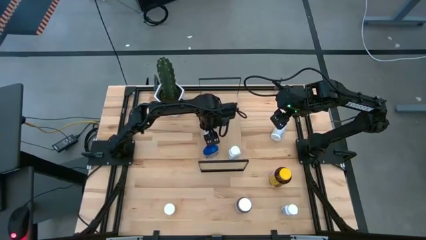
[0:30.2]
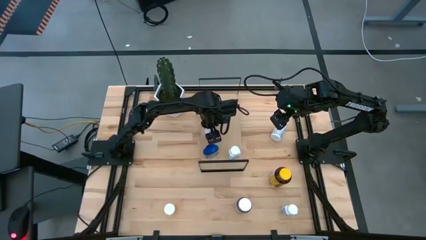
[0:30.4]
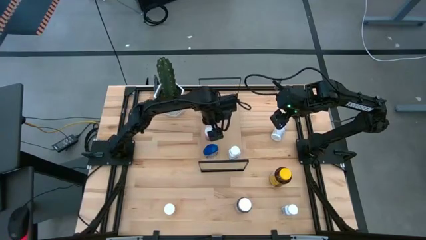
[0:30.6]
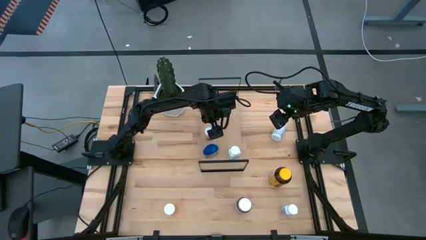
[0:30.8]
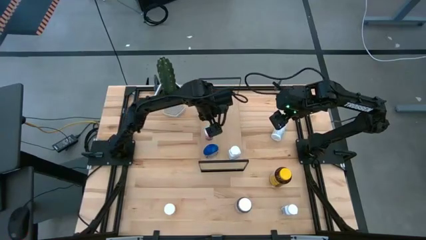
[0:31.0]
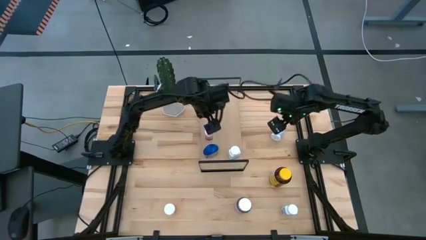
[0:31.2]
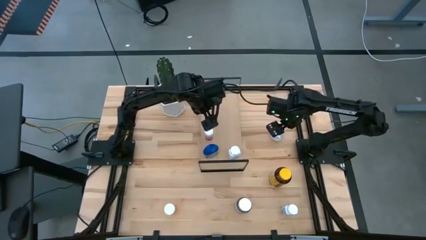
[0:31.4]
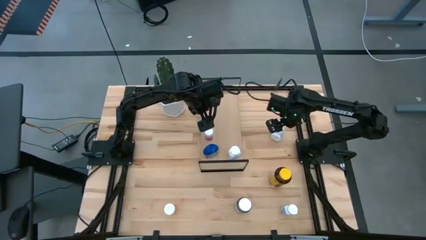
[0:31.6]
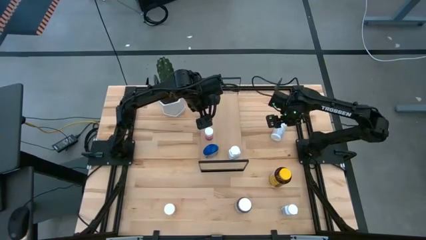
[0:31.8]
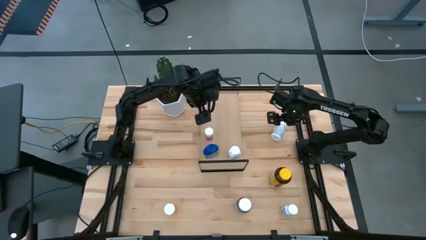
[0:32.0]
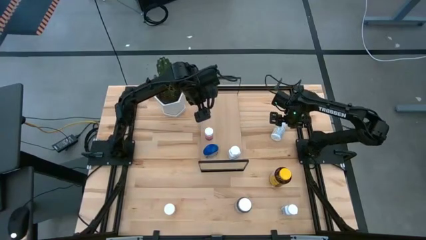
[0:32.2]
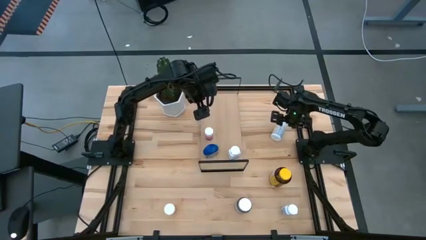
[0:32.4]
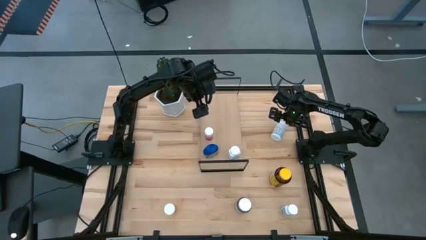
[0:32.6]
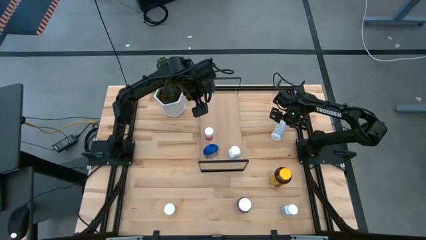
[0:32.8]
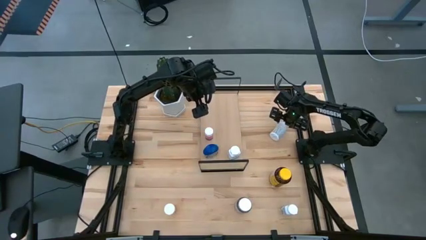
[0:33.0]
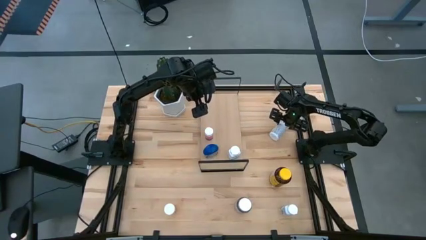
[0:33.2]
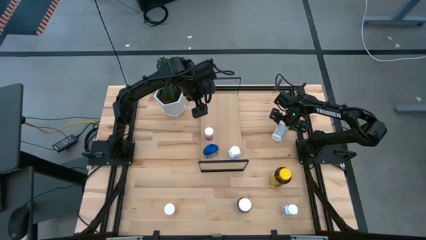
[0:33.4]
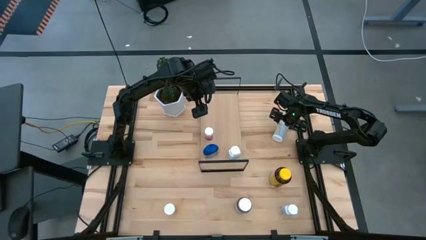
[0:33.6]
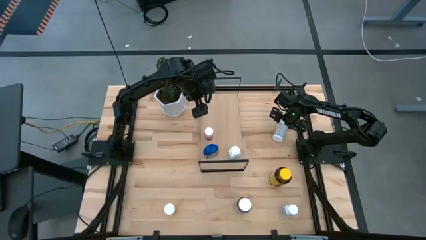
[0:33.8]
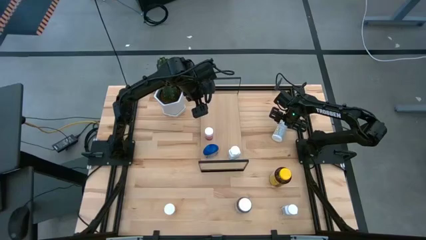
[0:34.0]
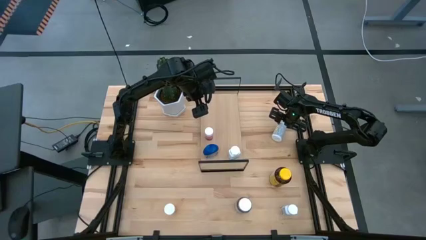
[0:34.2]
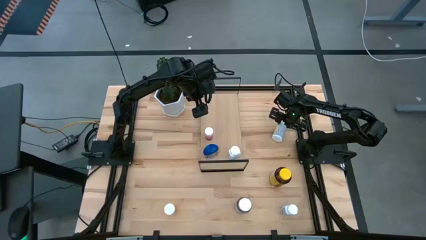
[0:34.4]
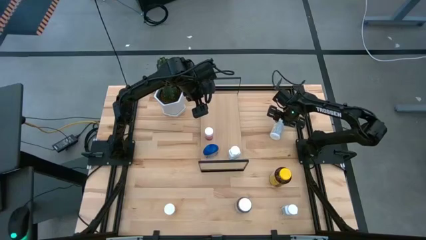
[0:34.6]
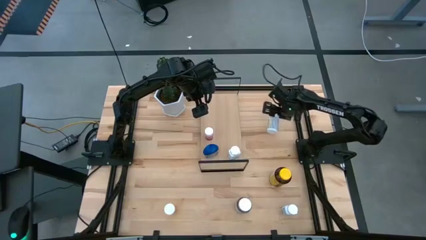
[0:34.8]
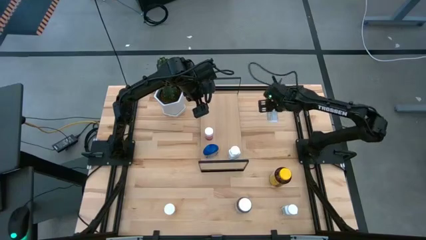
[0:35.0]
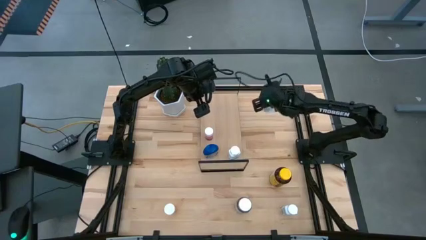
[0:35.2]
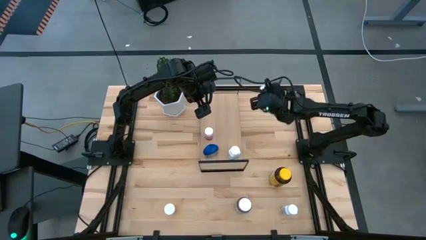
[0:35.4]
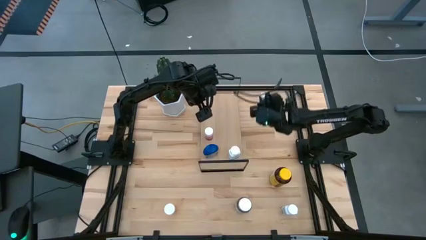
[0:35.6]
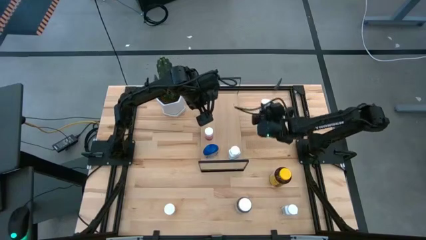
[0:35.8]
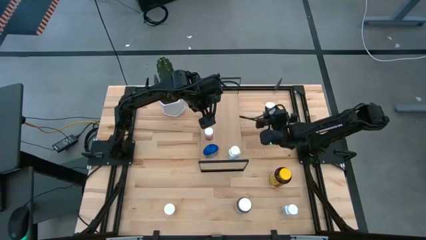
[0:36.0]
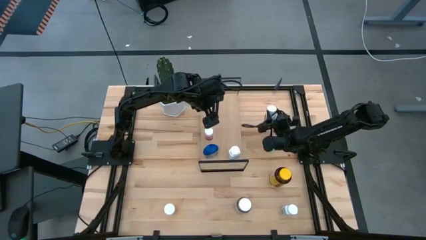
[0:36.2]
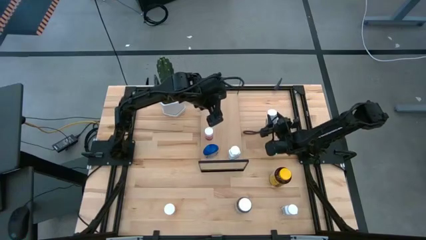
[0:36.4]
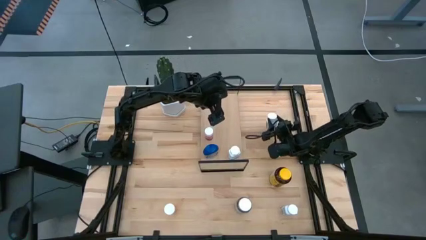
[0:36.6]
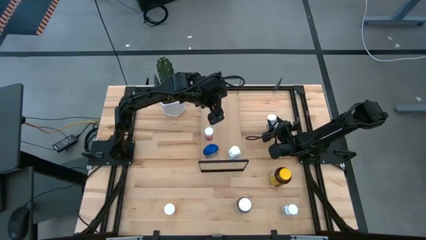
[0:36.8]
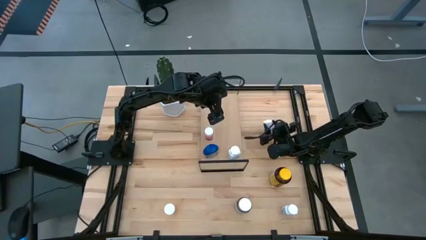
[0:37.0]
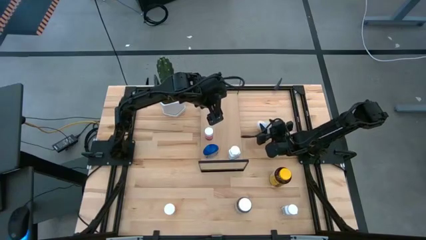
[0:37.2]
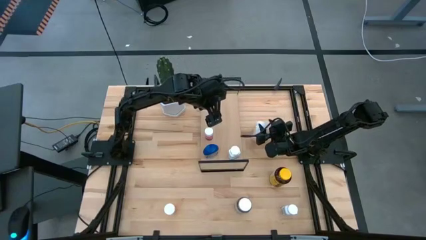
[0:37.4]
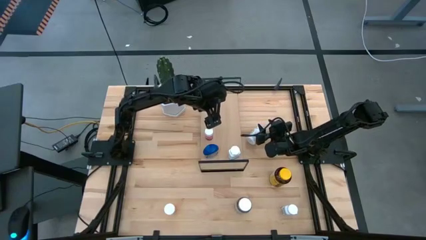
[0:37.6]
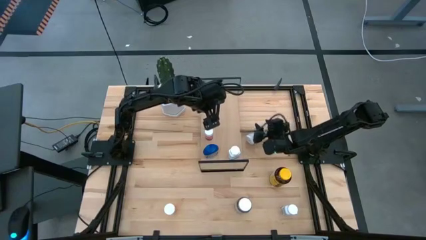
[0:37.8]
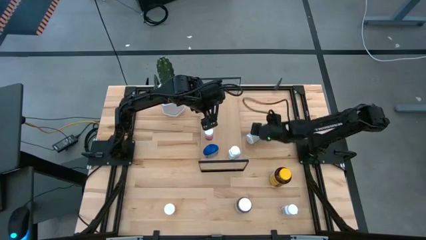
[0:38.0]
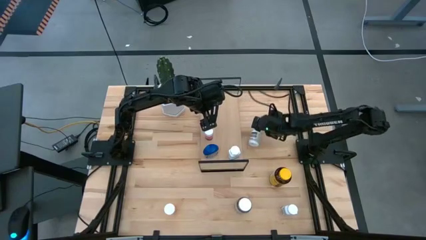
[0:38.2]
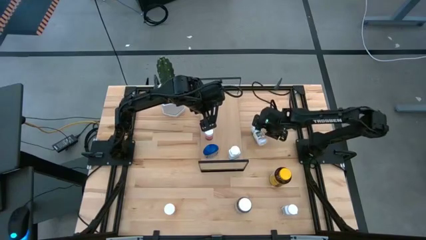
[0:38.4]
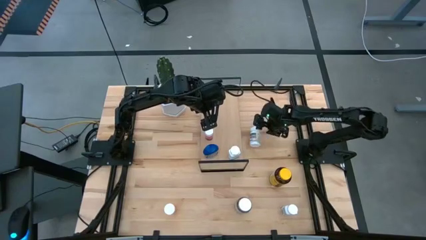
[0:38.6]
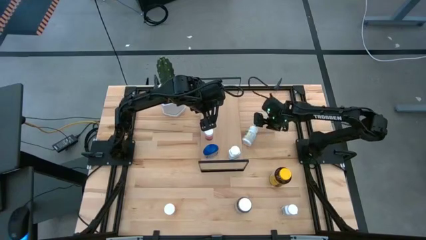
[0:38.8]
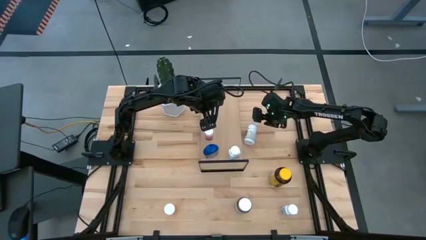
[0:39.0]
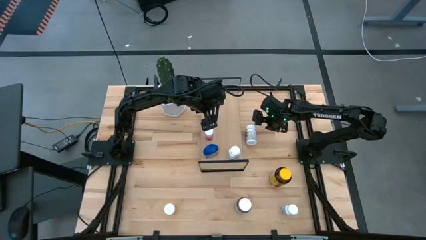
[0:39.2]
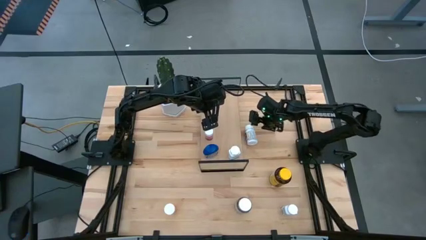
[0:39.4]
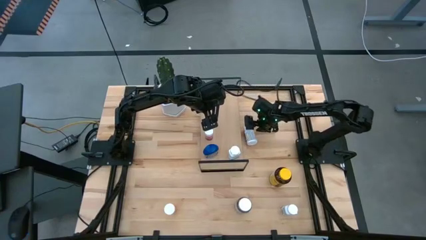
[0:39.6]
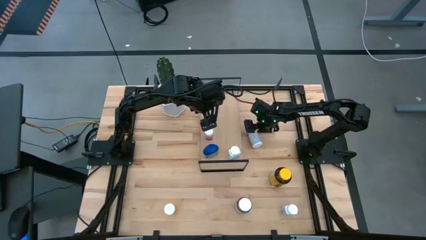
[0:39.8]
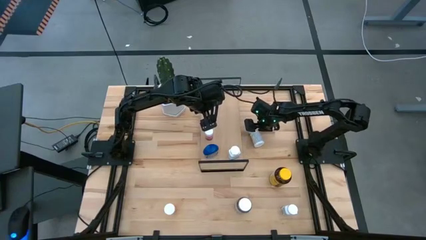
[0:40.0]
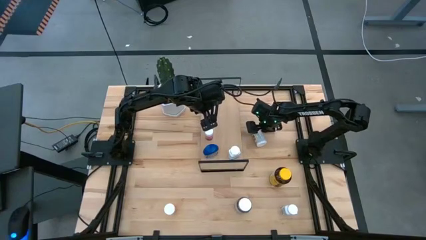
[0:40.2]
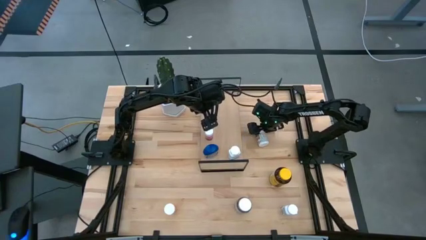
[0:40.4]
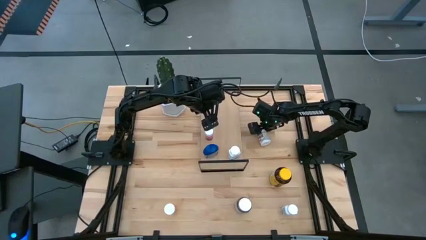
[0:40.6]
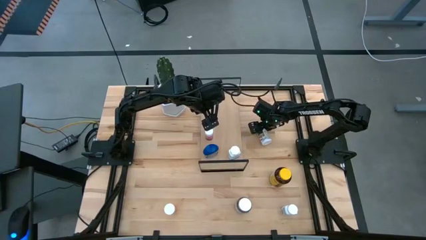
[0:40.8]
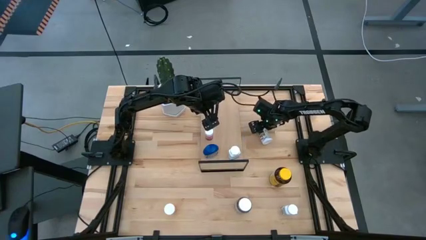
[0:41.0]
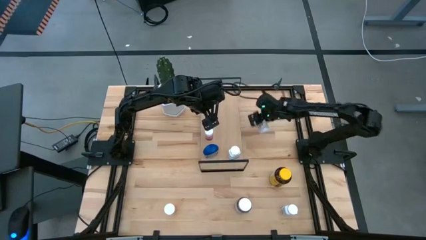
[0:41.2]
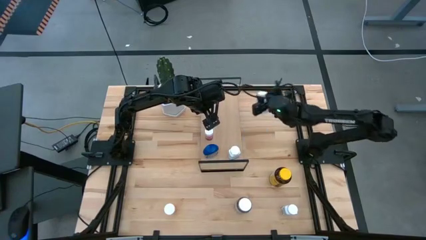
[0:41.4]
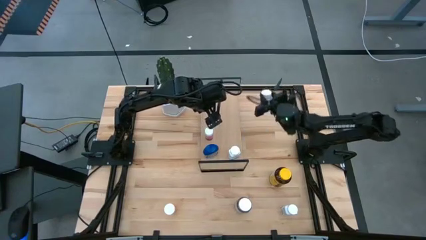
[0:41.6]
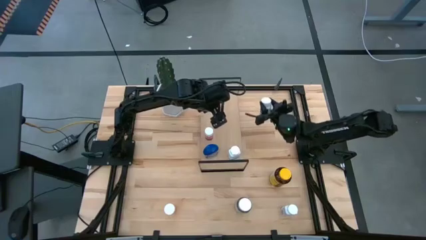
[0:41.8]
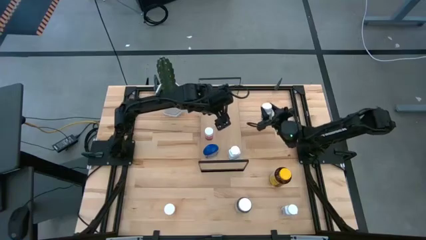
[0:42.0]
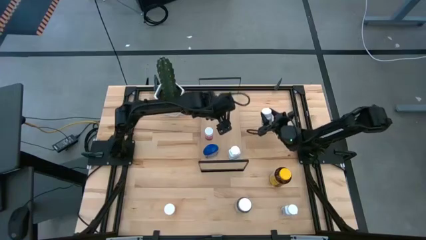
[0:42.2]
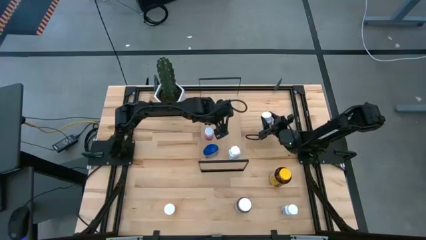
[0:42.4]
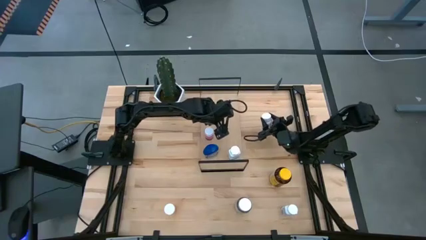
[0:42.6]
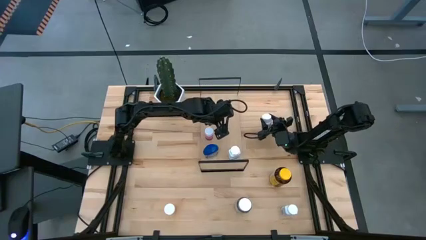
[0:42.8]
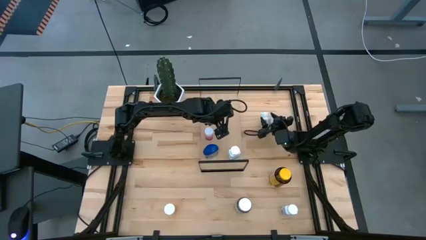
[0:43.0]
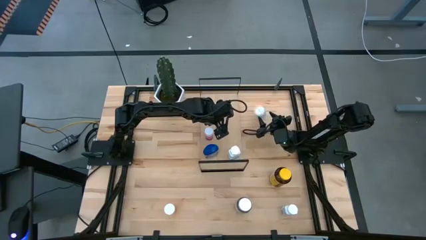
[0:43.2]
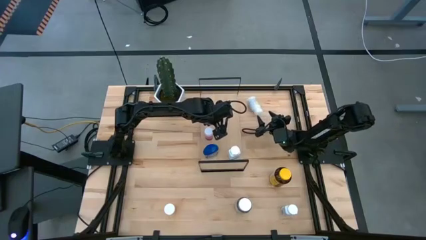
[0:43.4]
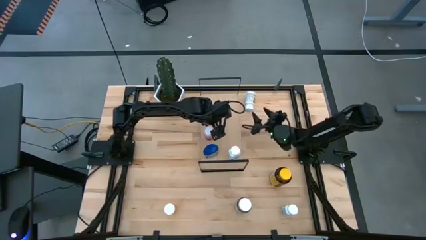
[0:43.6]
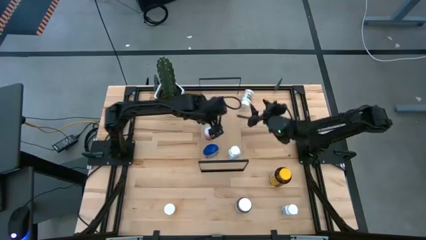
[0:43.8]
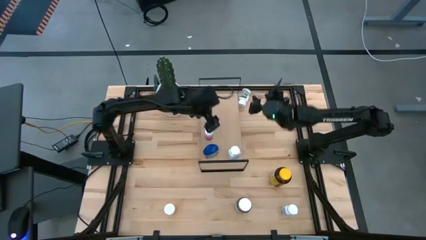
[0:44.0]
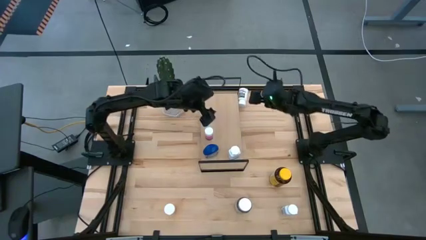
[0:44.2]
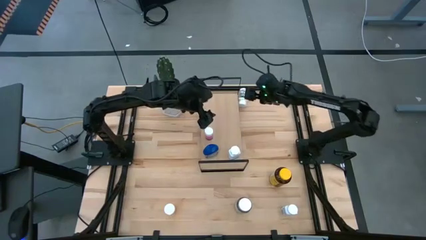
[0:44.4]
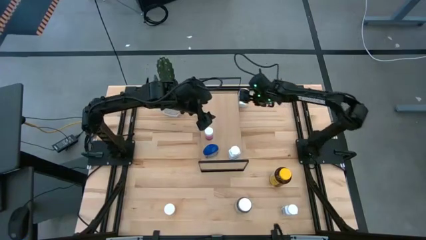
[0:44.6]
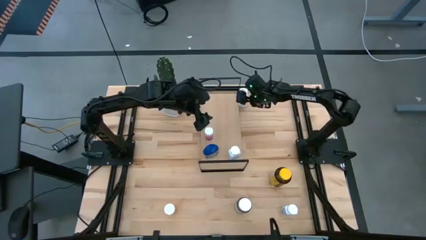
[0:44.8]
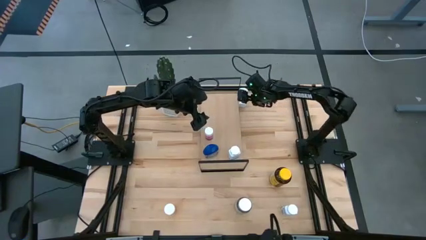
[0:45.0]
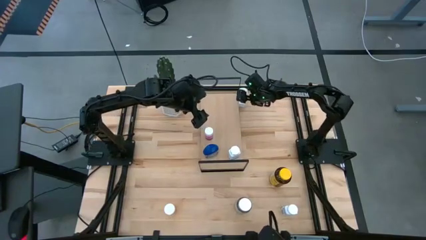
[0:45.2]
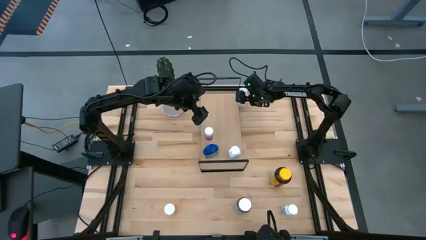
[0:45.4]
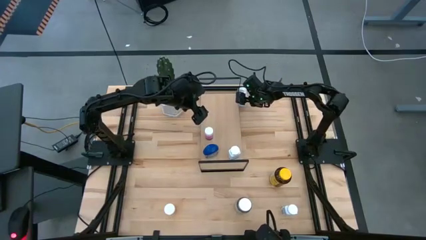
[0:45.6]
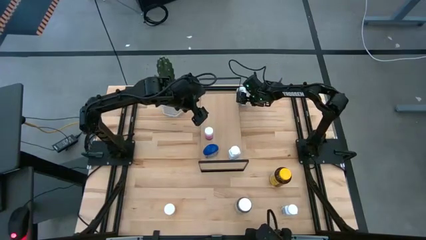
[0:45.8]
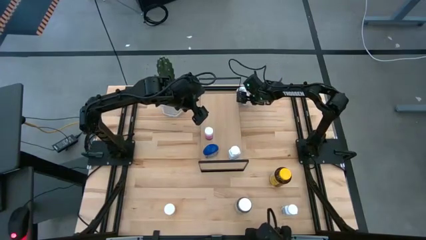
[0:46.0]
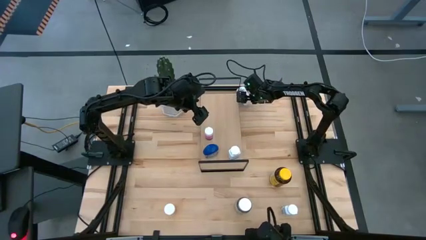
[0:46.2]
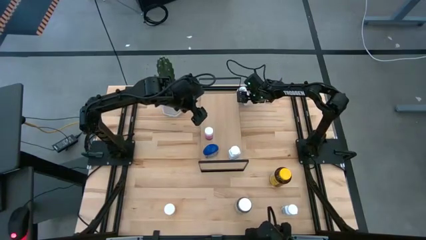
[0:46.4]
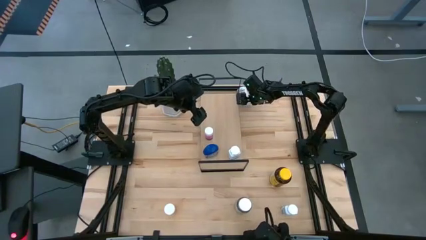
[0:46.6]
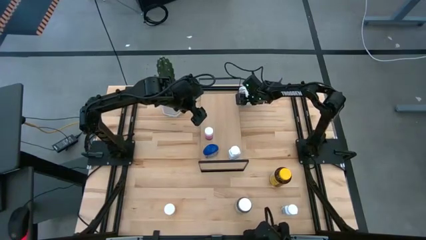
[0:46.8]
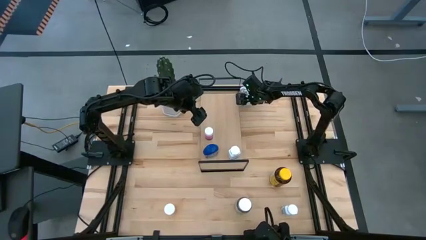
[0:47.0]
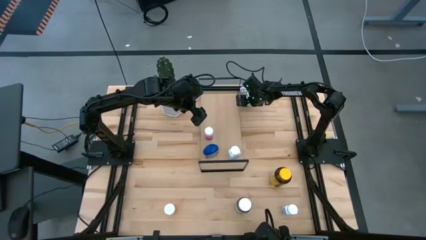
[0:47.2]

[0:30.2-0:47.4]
Task: Pick and place medicine bottles onto shelf by color
Put the white medicine bottle on the shelf
